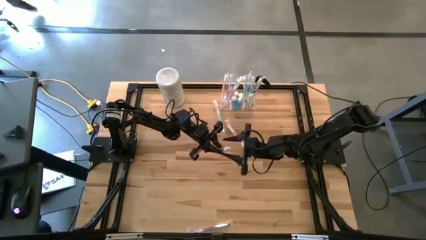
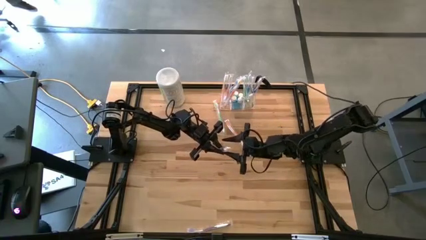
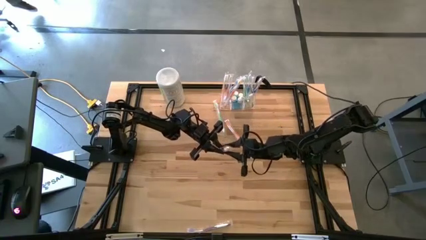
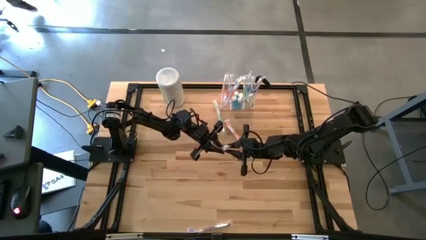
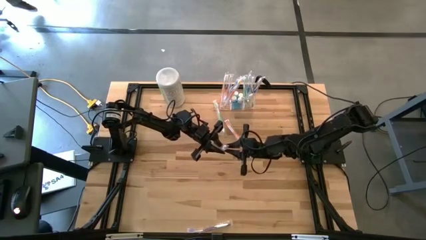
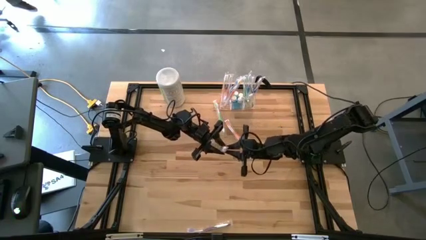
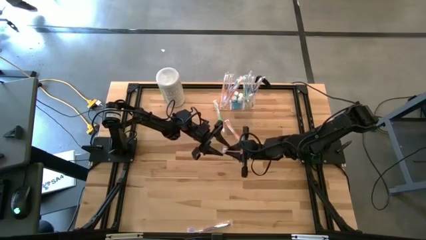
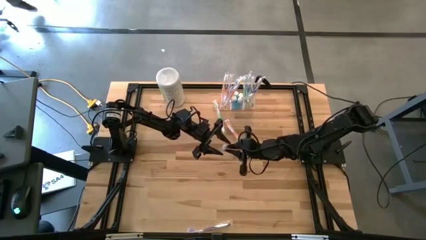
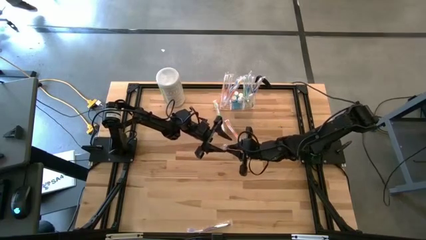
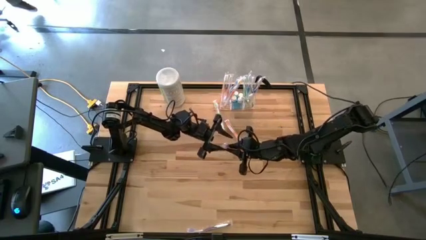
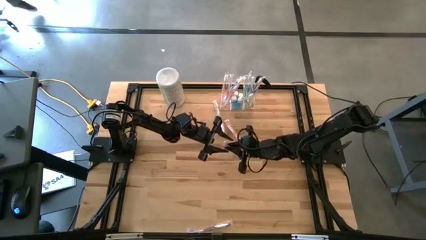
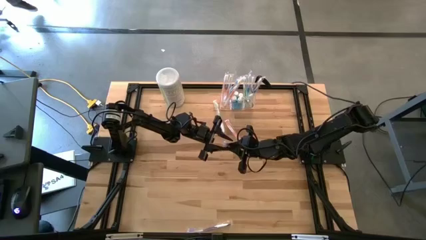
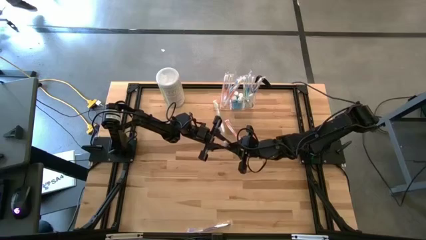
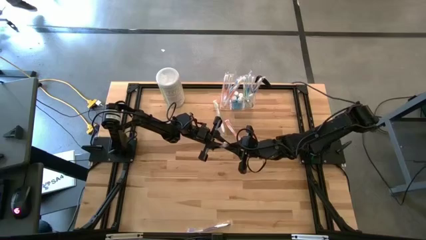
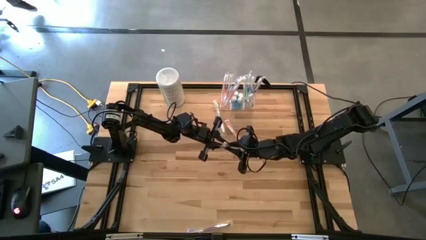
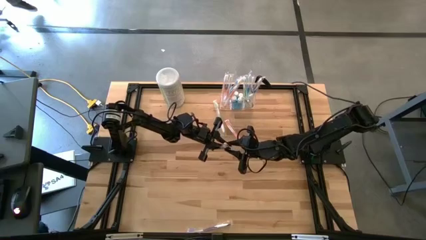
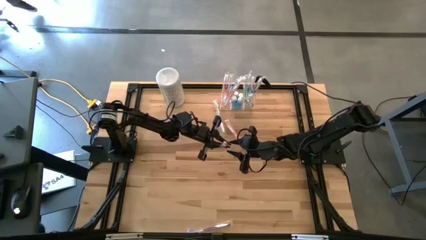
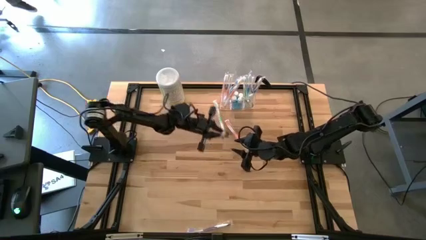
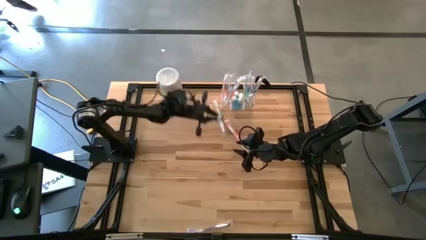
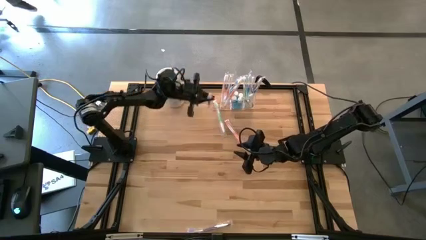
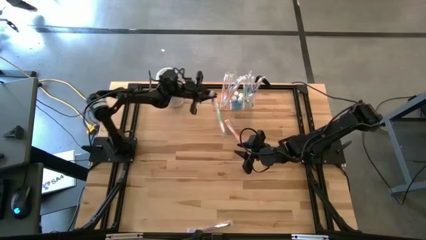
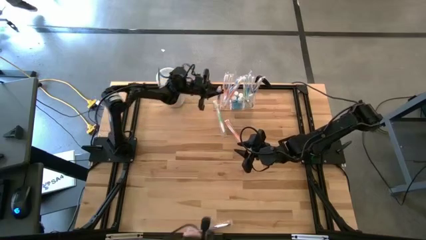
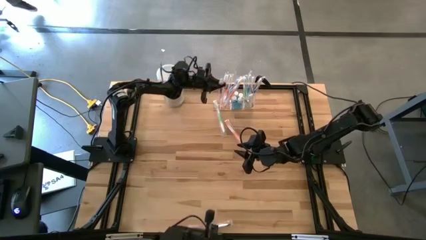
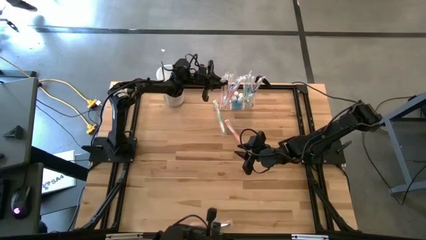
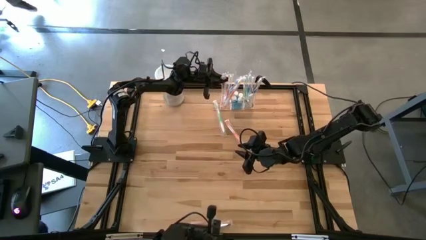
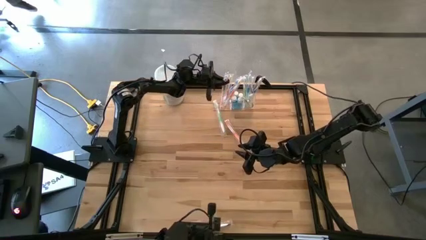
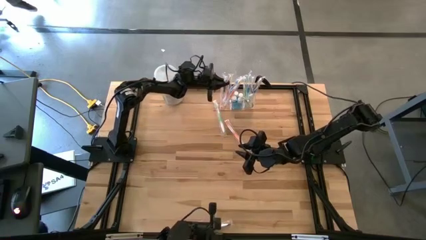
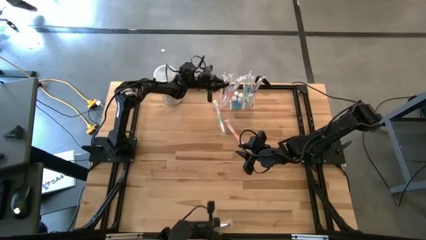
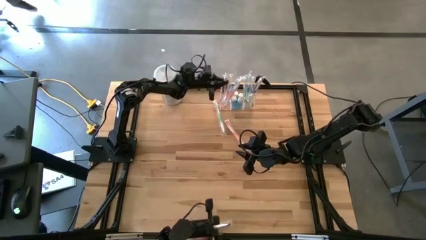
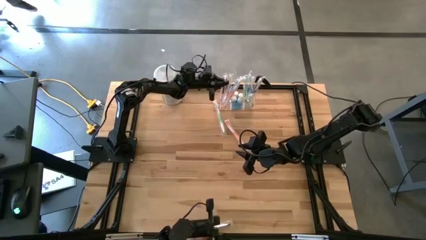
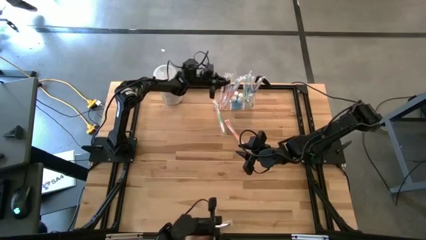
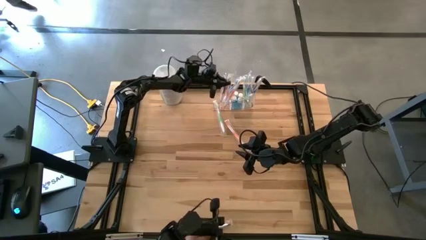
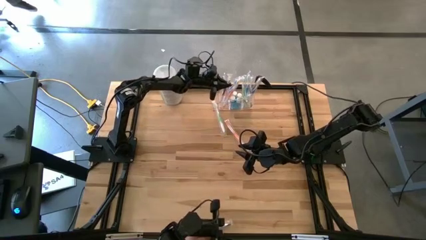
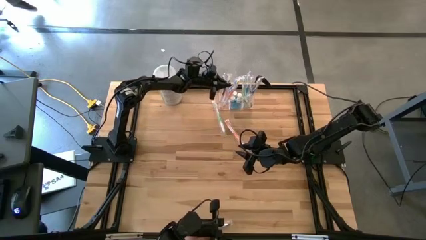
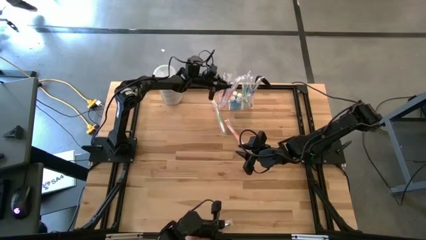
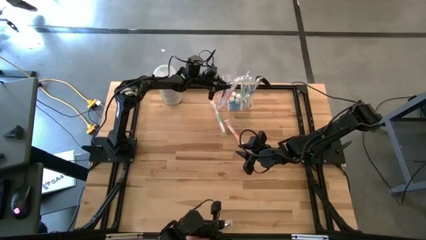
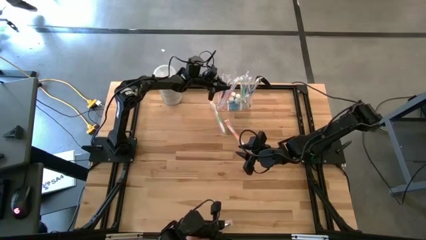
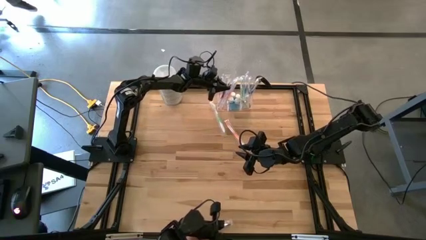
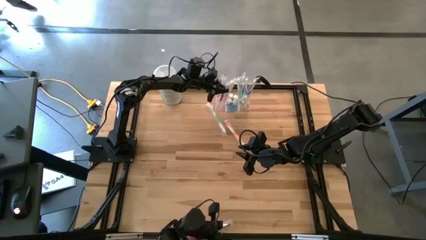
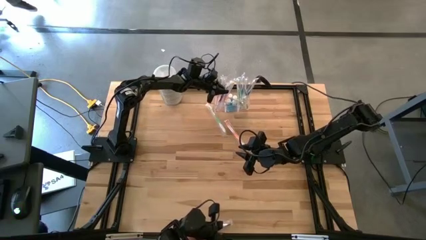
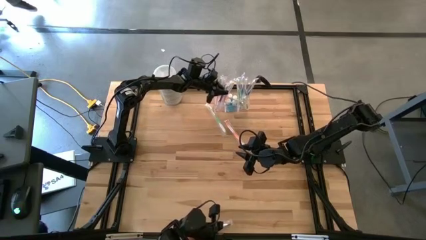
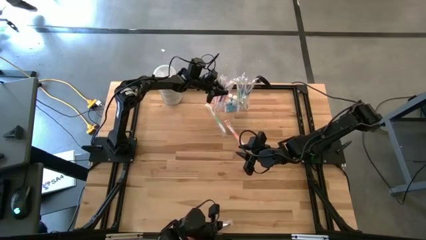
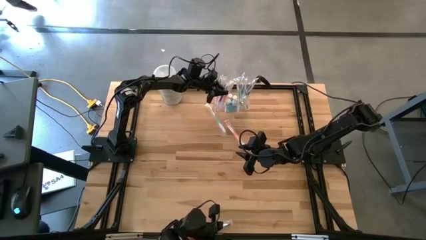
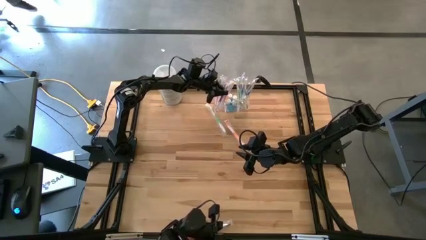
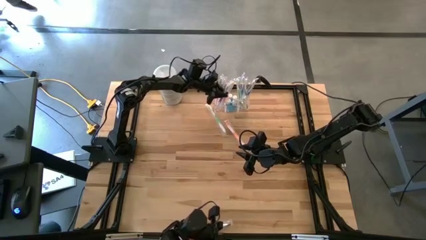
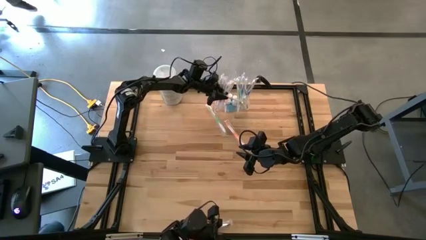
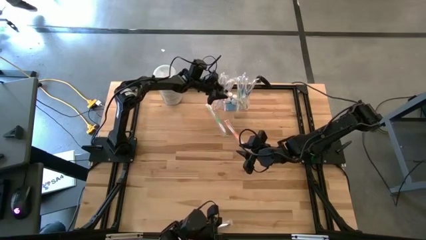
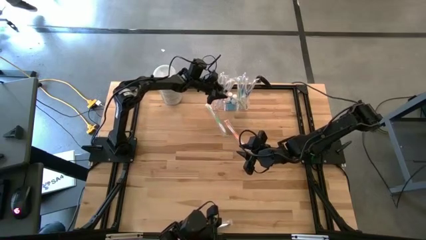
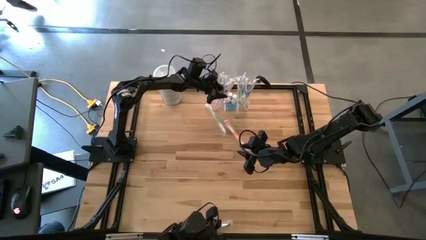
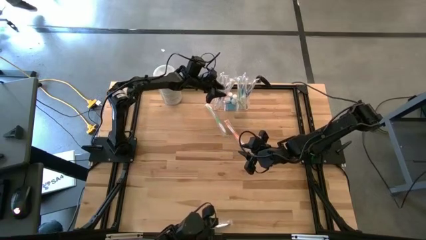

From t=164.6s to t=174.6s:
Task: Pick & Place toothbrushing station
Put the violet toothbrush into the transparent organizer

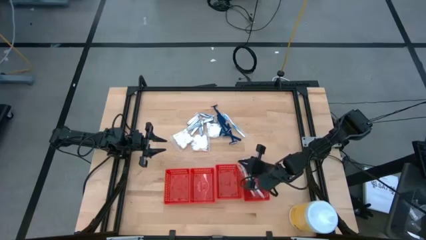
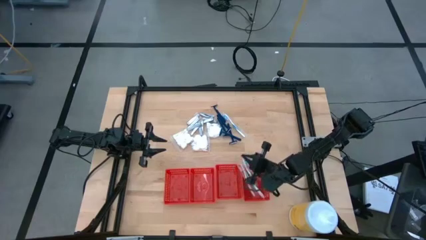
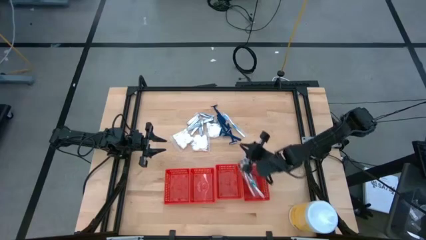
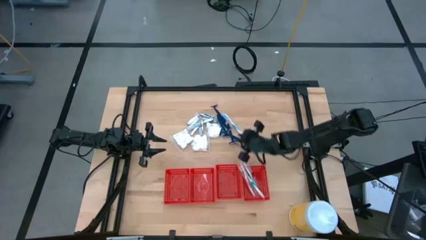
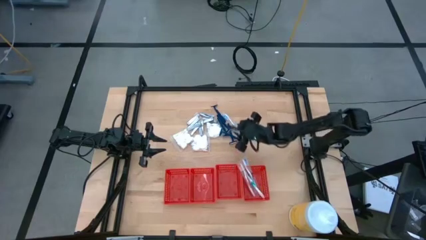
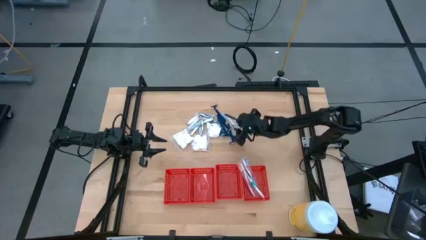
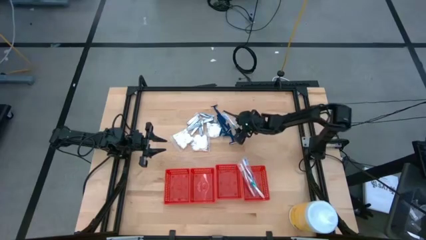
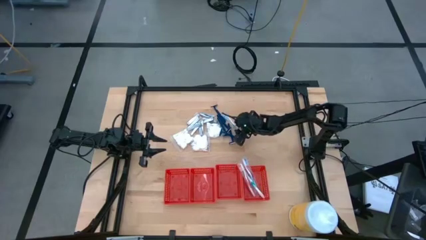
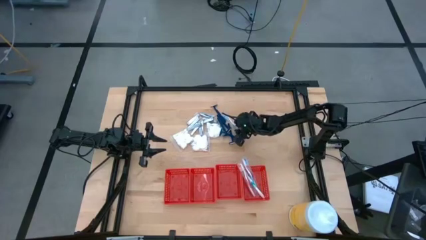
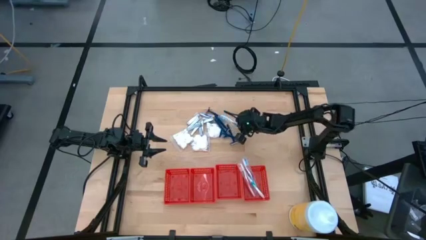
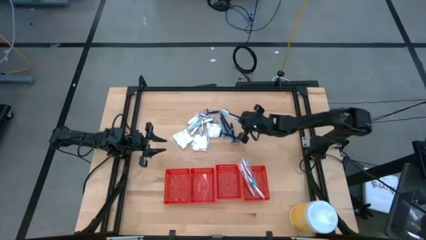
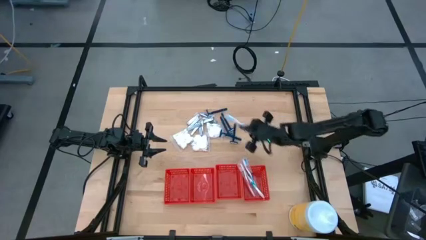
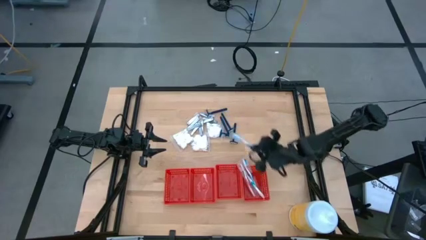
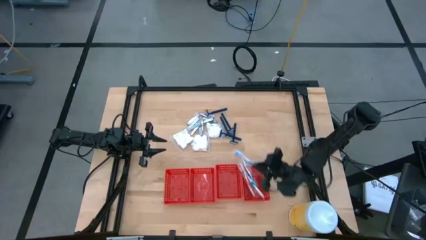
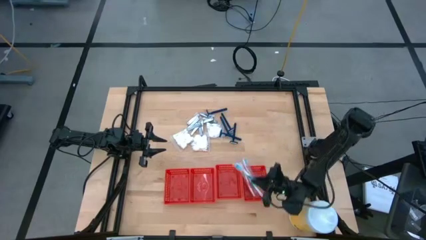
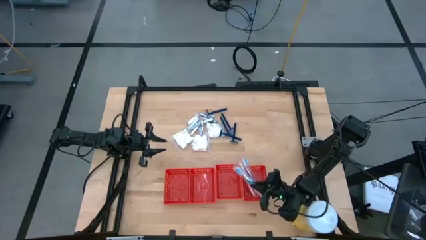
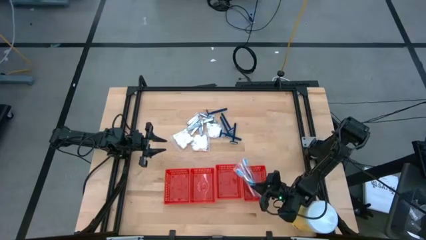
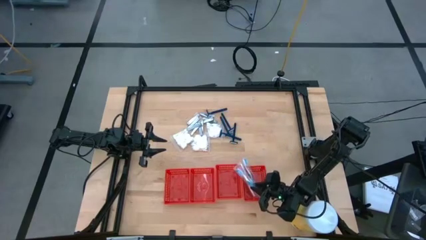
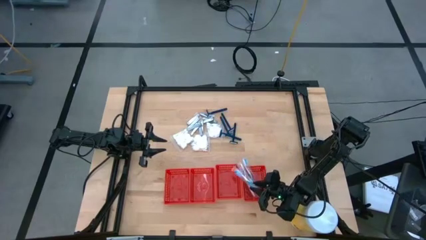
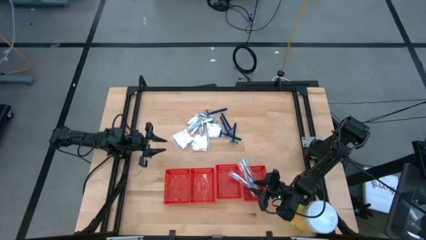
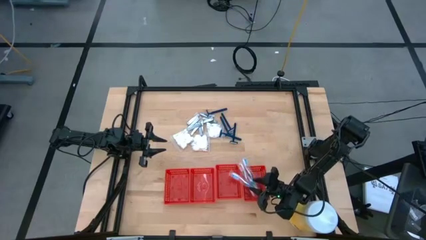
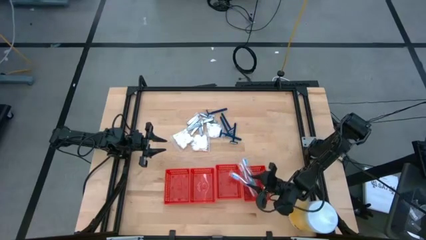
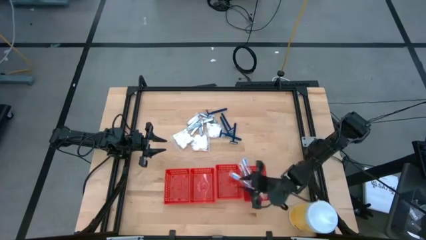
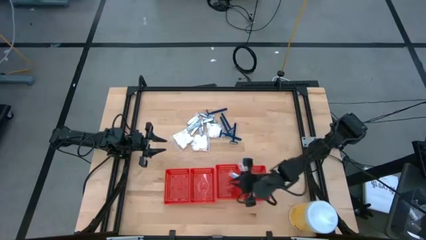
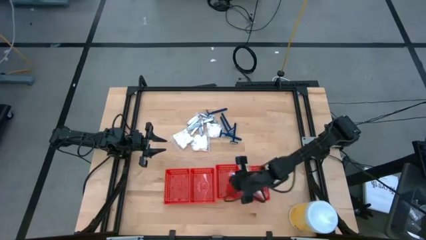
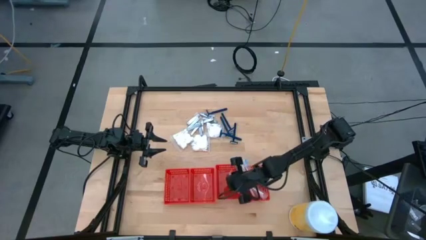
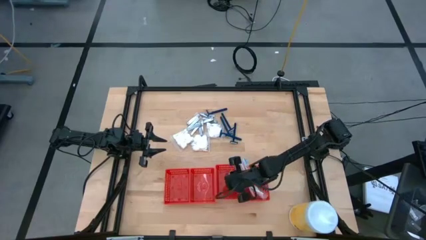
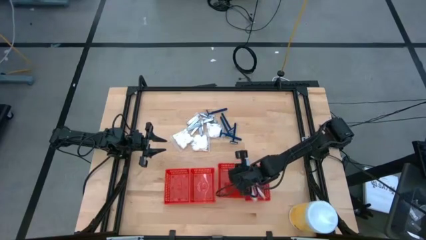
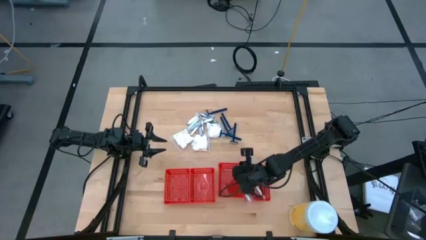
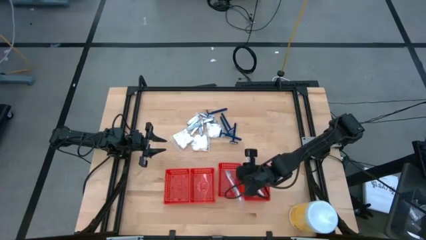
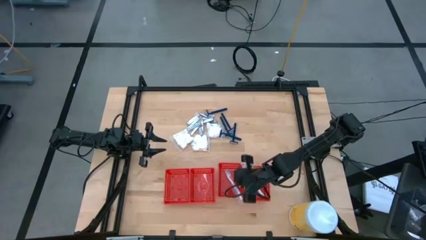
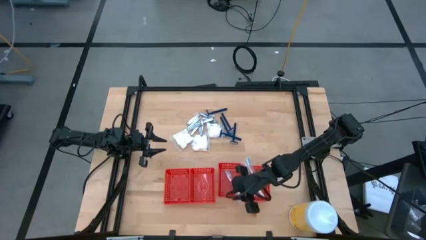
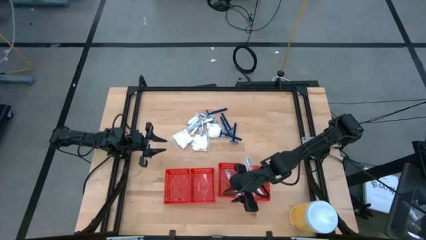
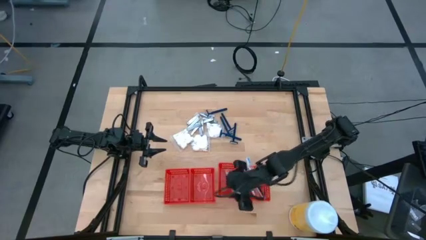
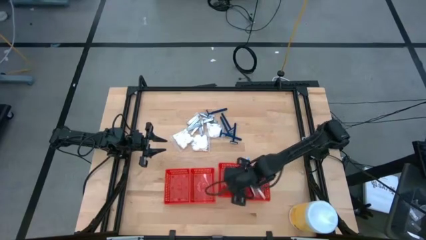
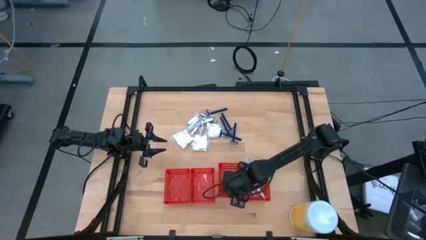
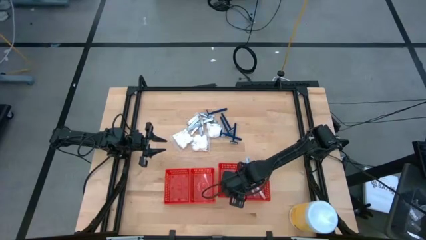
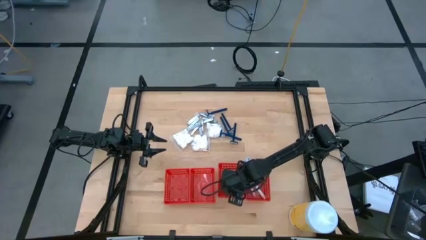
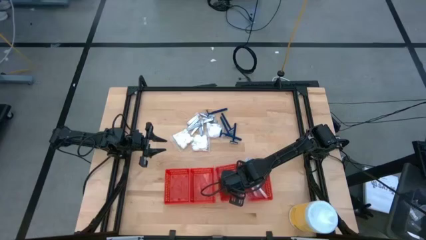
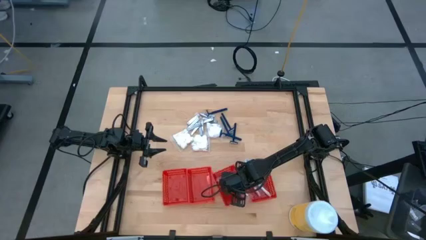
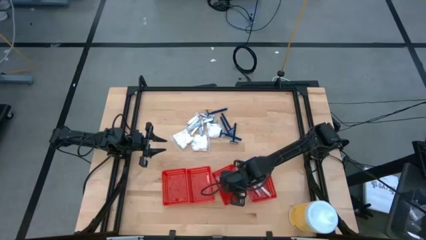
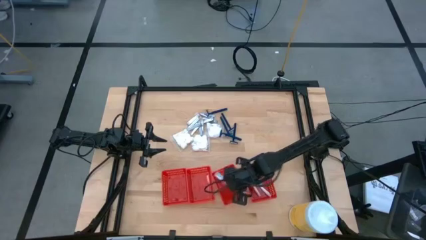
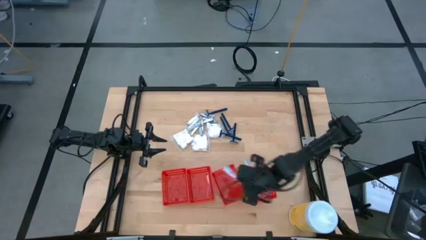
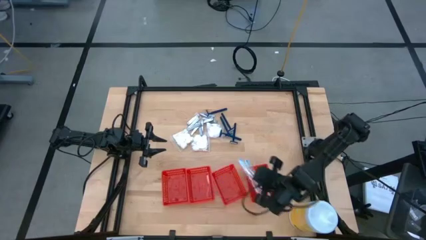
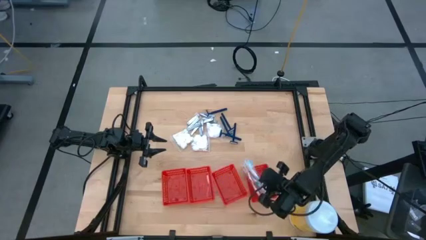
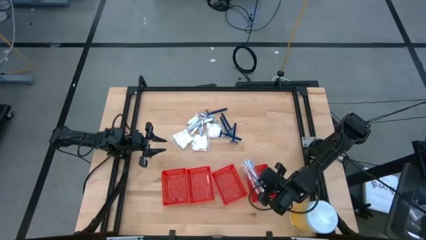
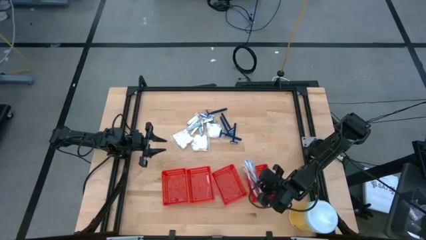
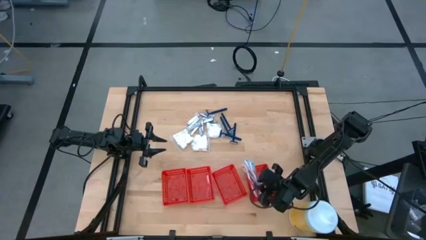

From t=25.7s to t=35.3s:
Task: Pick & Place Travel size toiletries
Put the blue toothbrush into the right red bin
